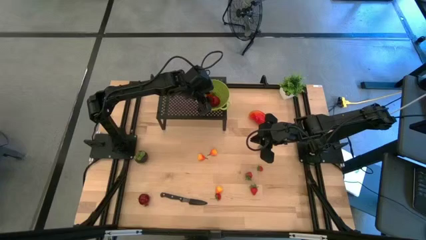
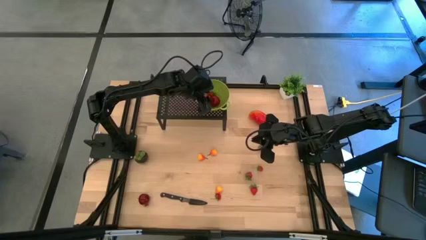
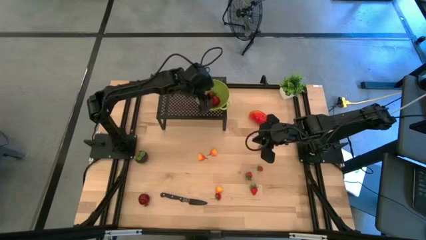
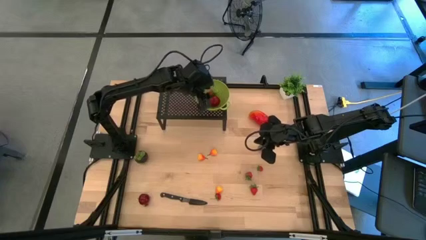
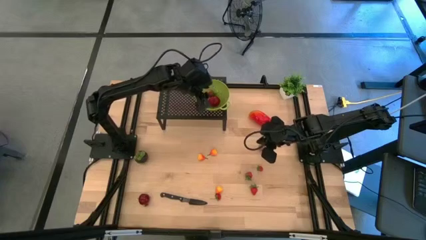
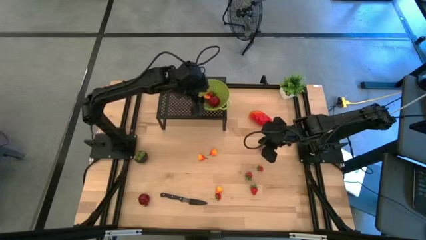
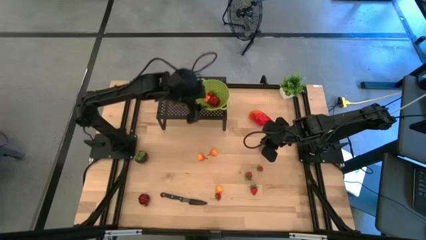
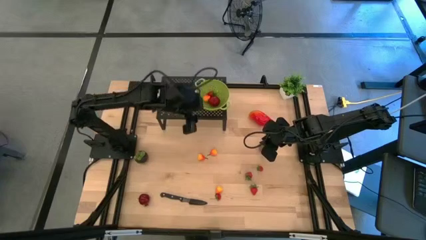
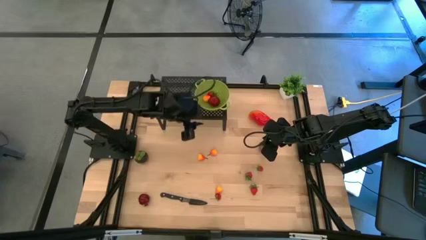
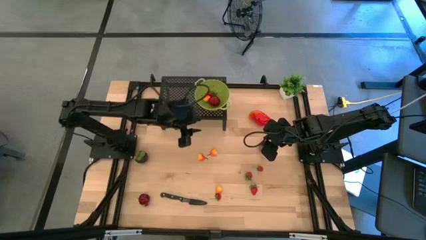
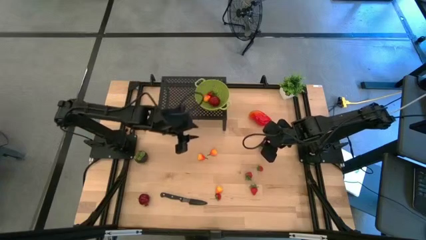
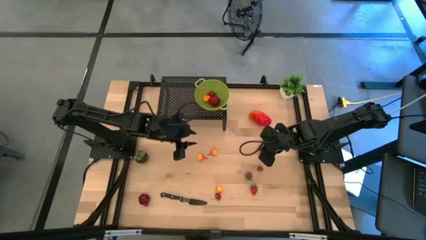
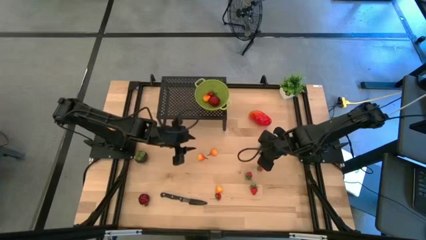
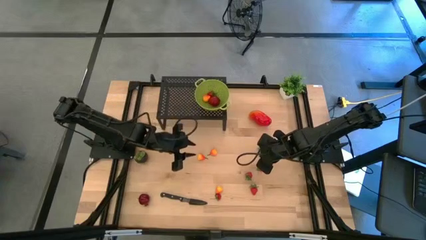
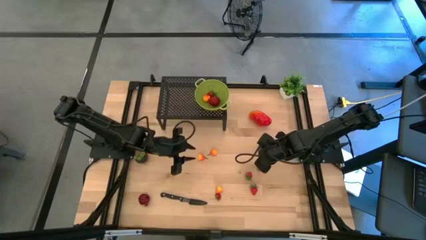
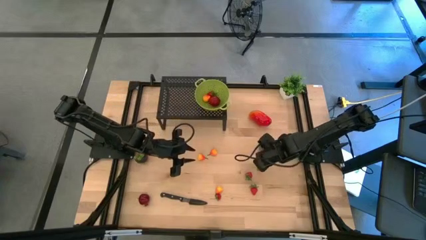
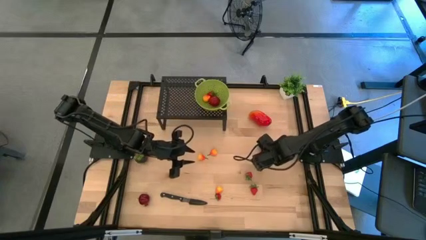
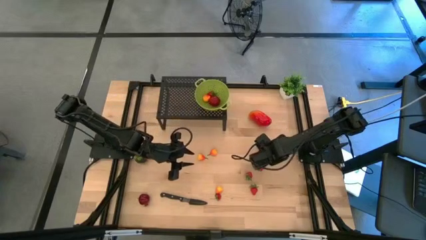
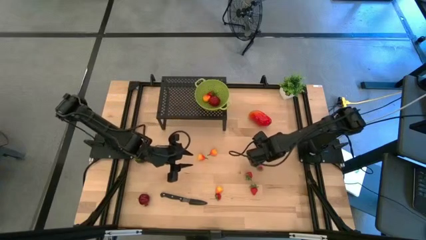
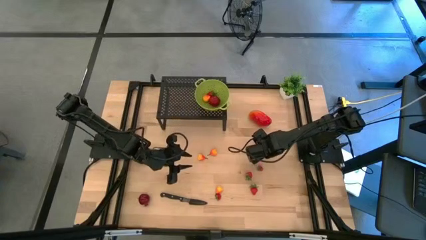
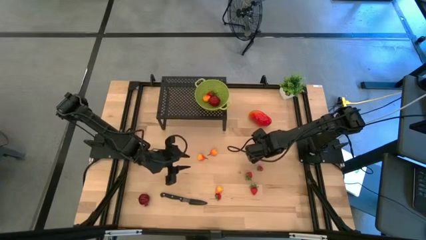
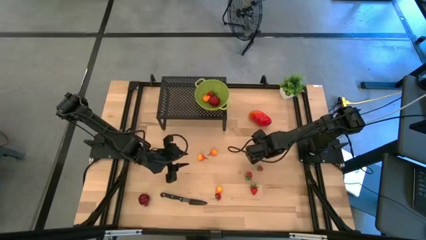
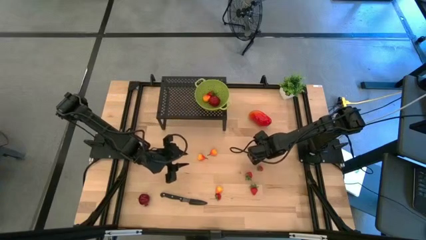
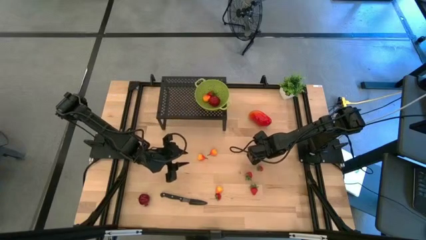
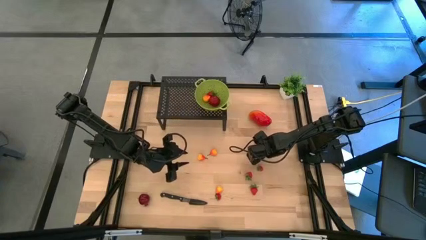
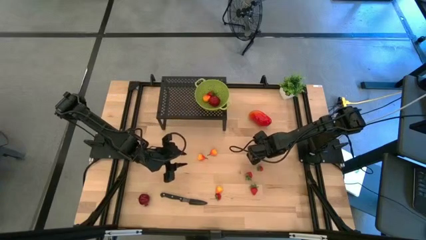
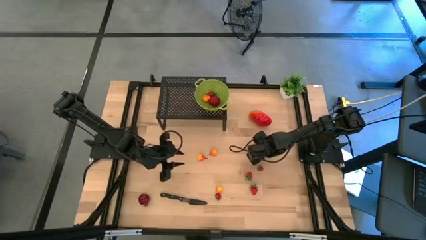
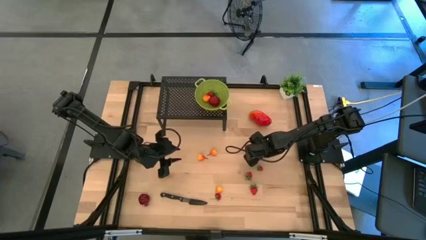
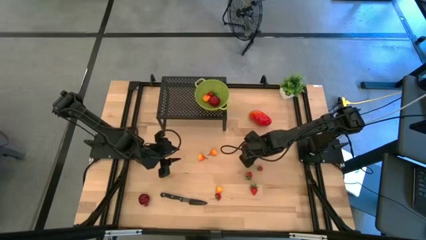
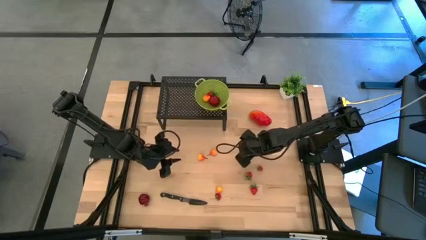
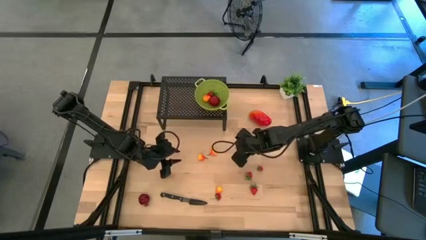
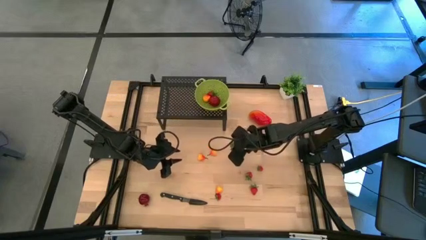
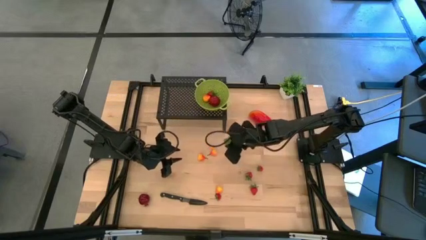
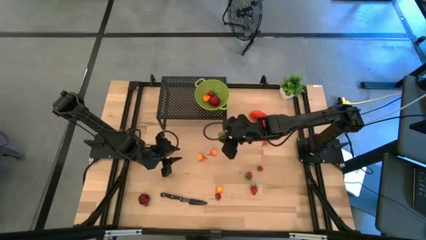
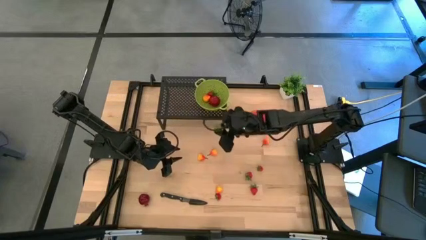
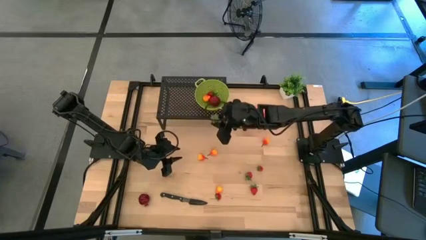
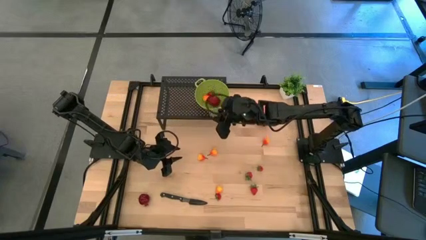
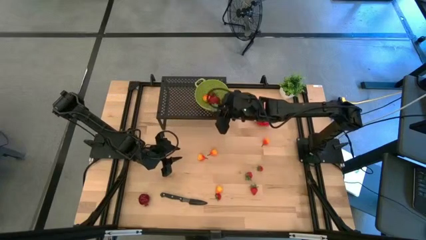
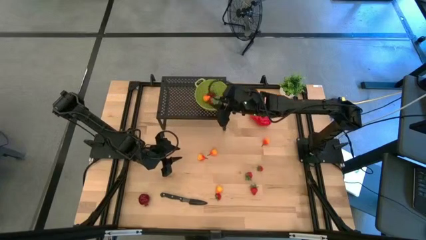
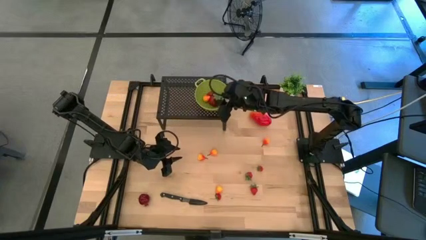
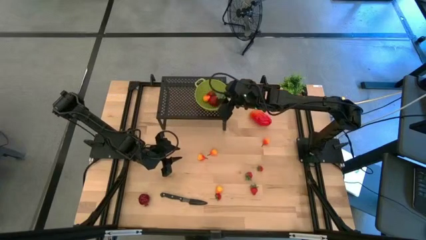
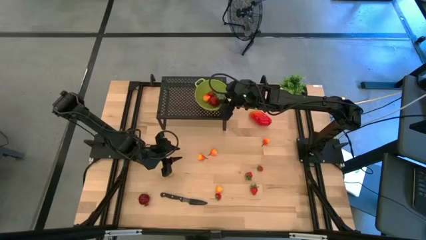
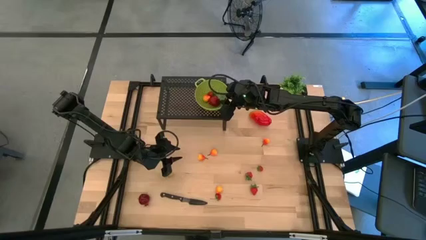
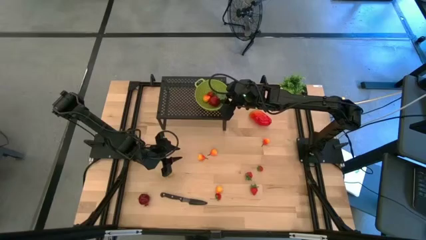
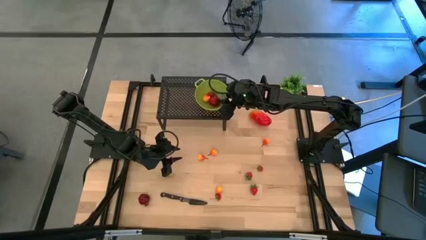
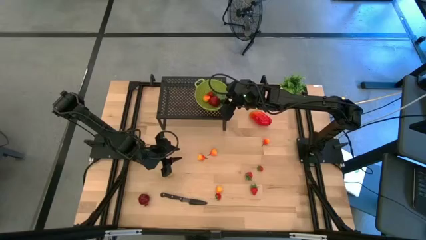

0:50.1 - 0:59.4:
Task: Pick & Place Fruit
Put the strawberry into the green strainer bowl on the shelf

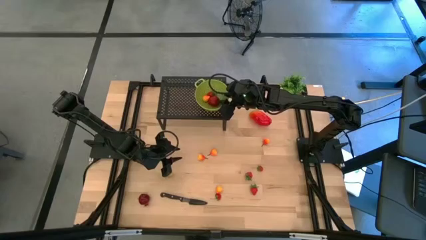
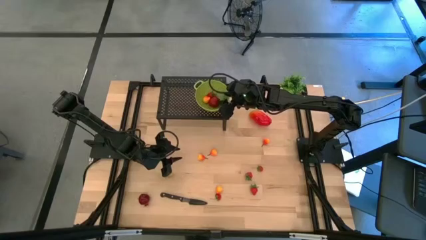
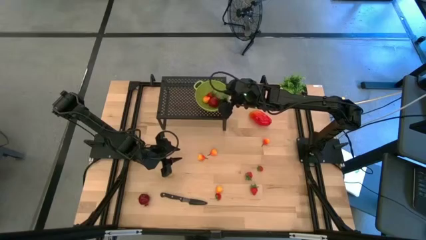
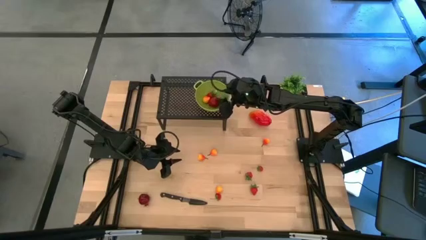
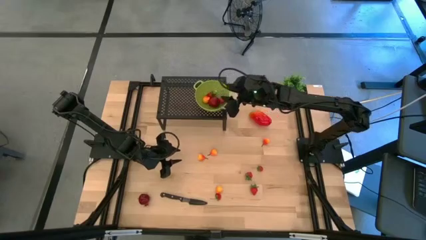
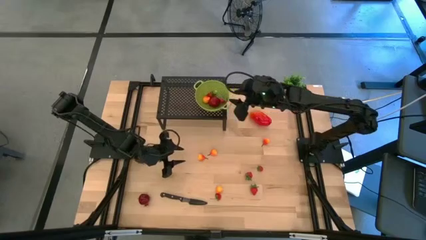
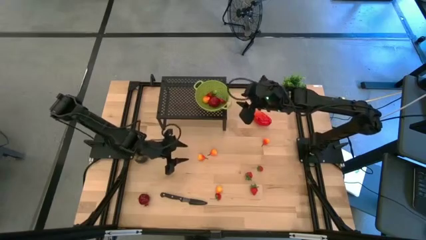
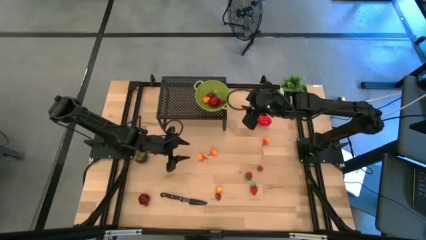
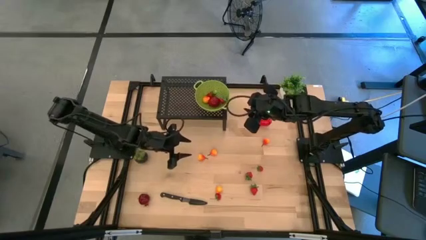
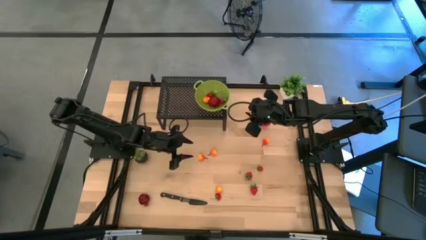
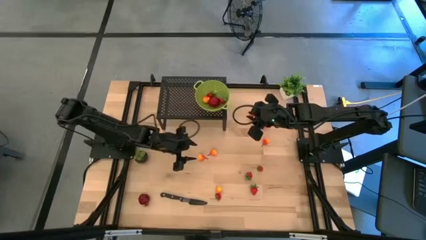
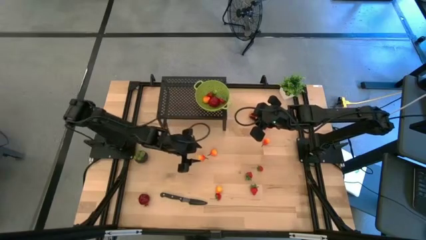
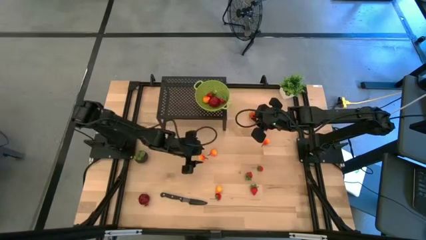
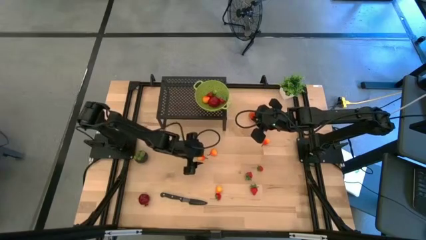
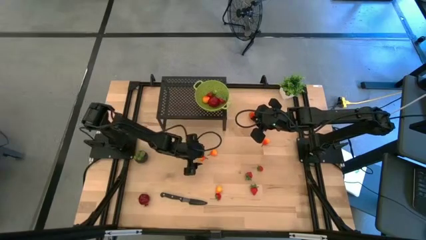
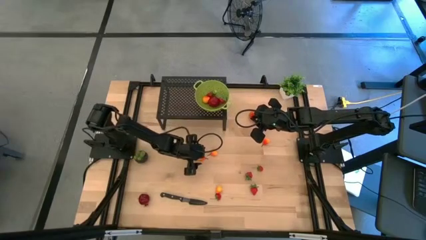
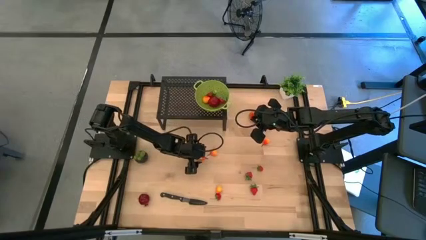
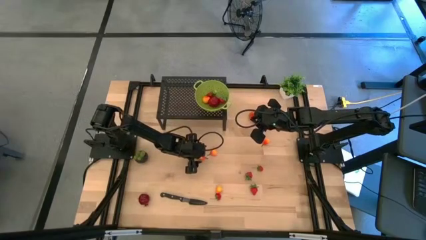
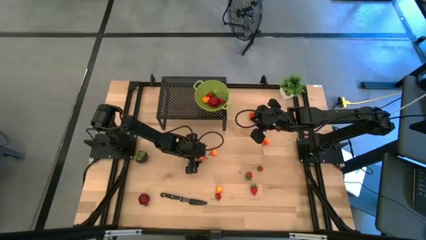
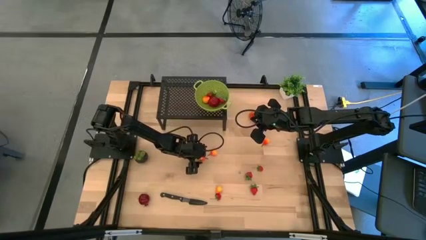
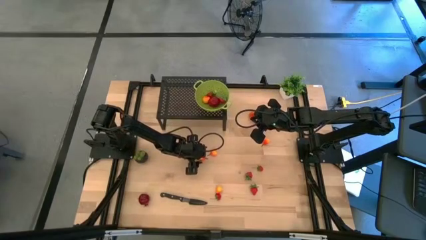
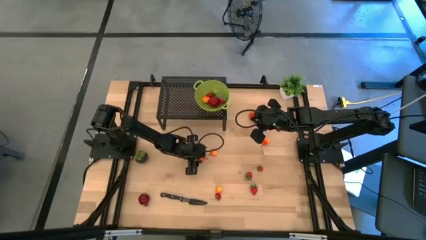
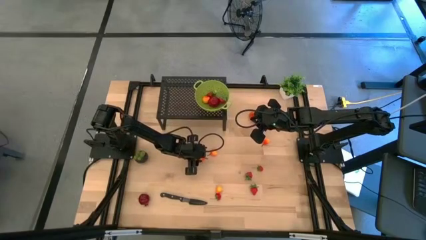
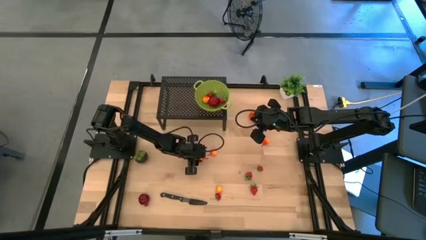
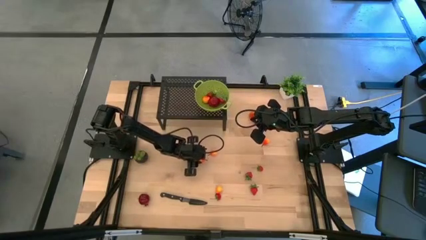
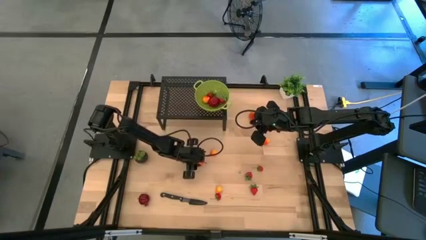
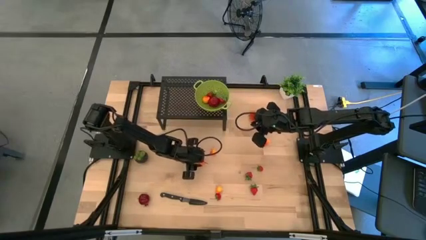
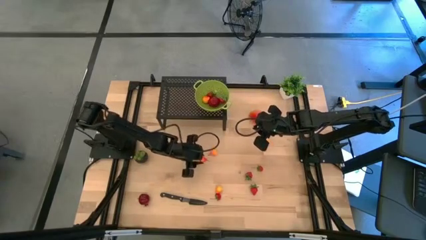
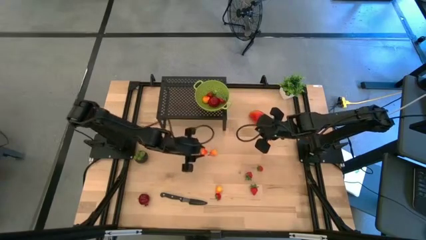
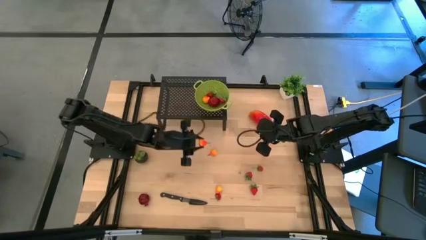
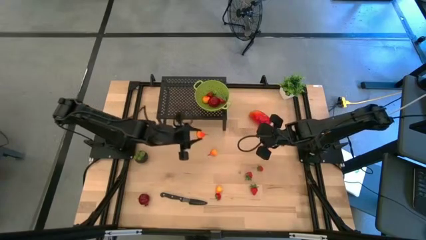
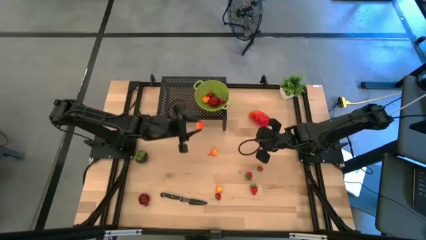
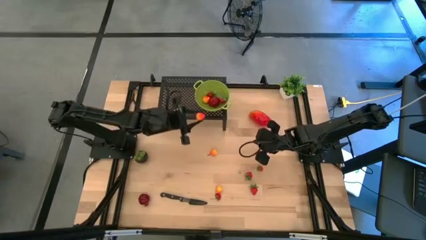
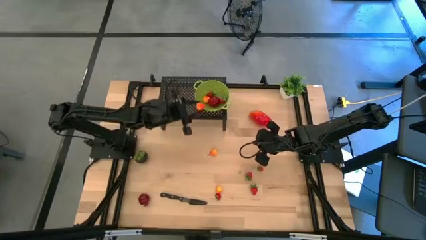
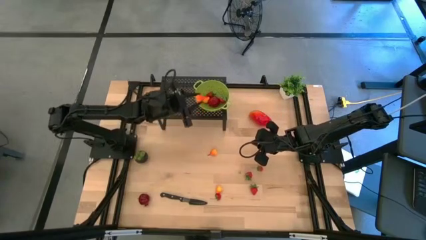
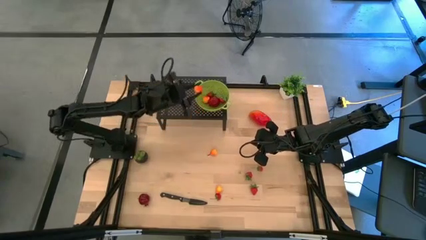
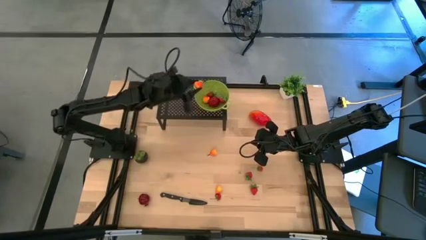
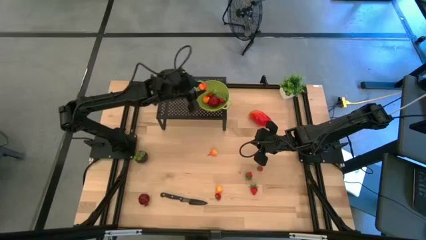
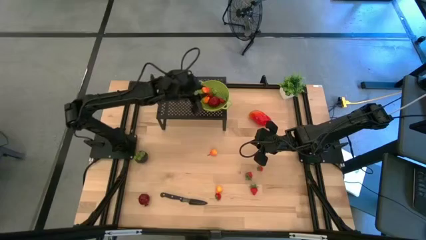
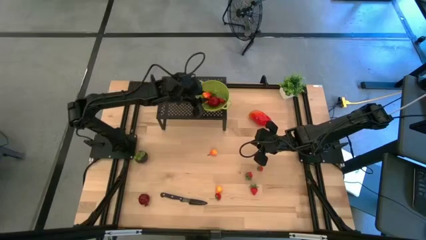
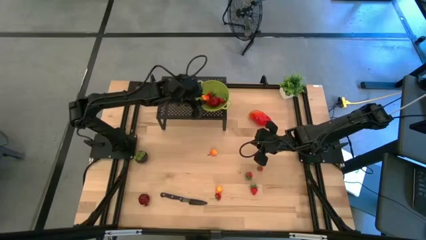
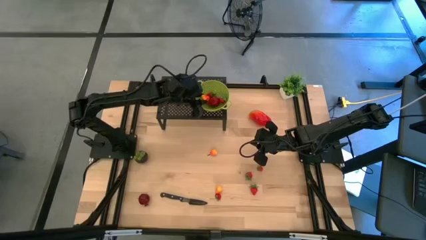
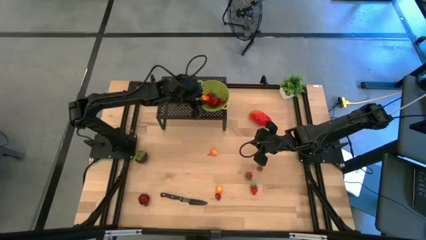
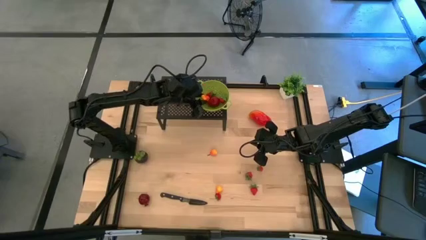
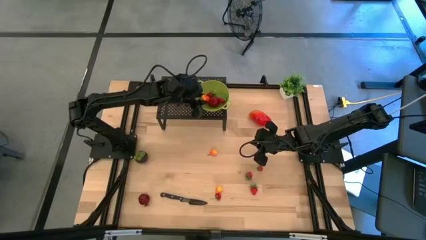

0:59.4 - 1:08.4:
Put the pear into the green strainer bowl on the shelf
